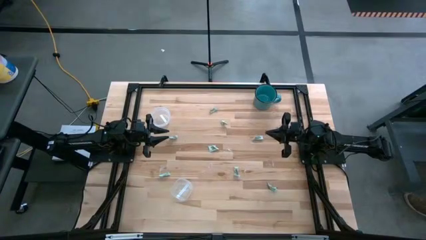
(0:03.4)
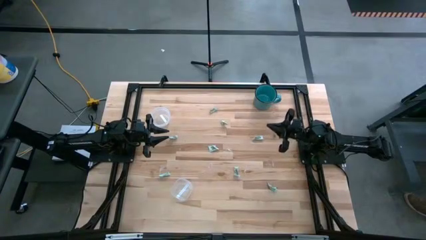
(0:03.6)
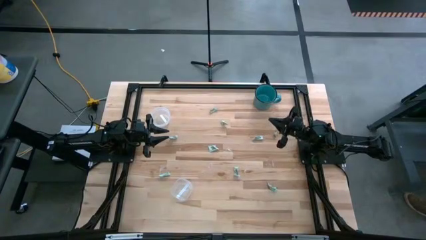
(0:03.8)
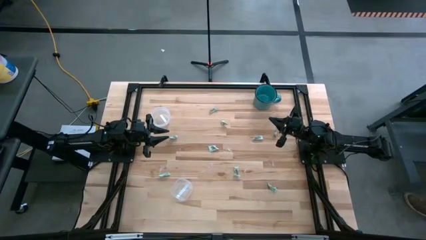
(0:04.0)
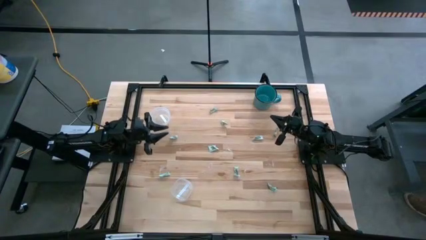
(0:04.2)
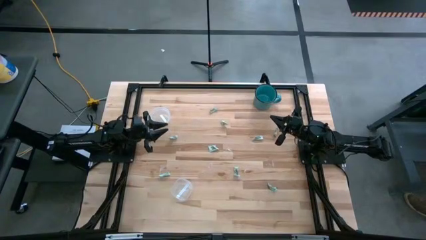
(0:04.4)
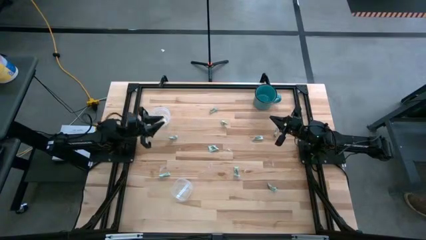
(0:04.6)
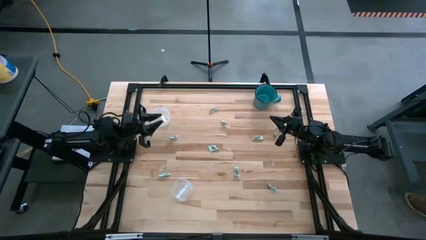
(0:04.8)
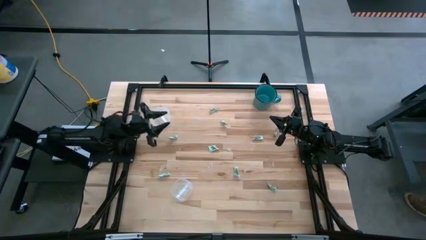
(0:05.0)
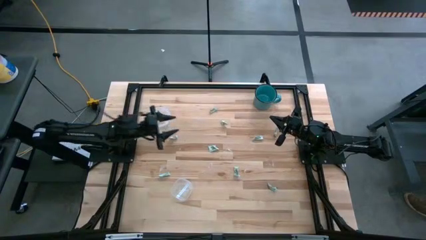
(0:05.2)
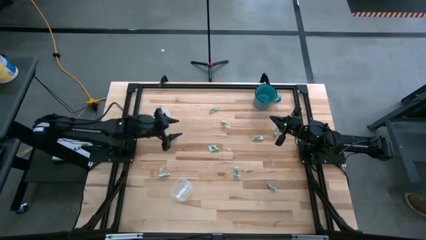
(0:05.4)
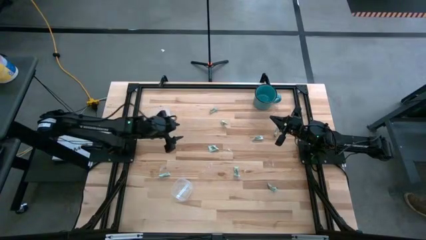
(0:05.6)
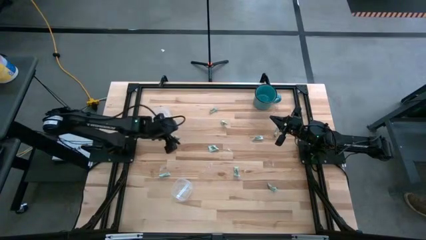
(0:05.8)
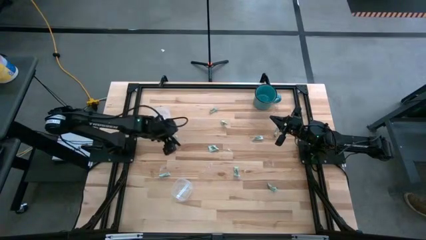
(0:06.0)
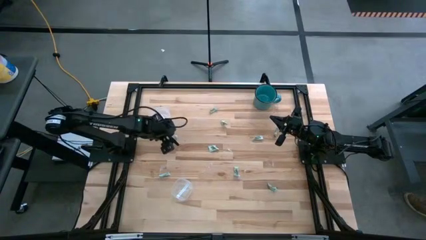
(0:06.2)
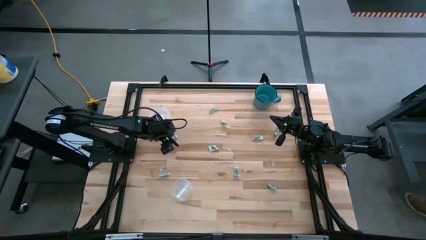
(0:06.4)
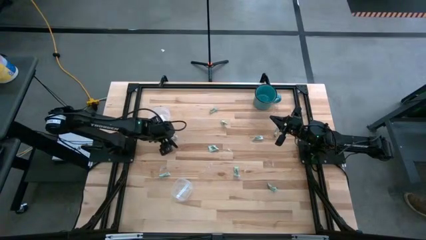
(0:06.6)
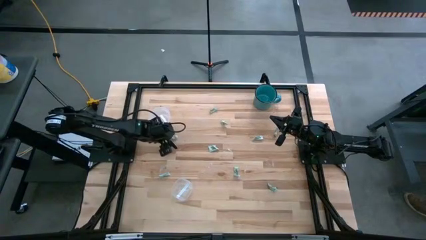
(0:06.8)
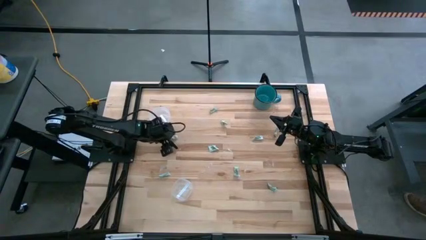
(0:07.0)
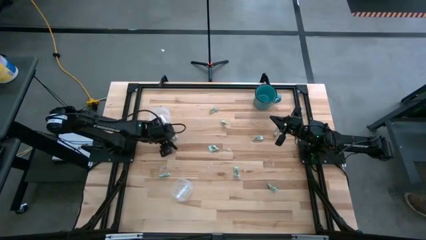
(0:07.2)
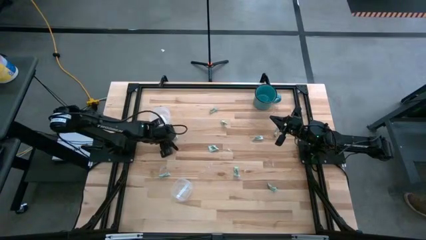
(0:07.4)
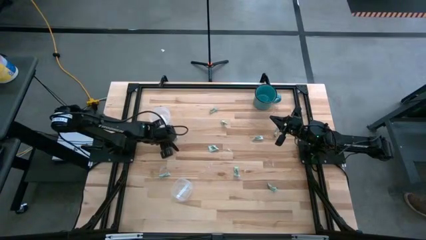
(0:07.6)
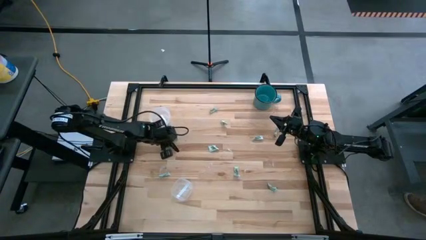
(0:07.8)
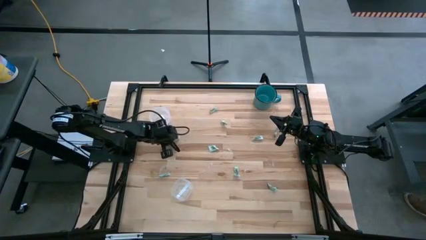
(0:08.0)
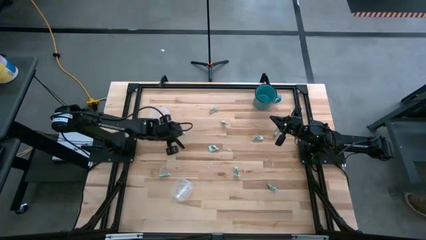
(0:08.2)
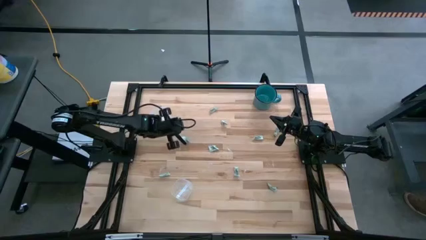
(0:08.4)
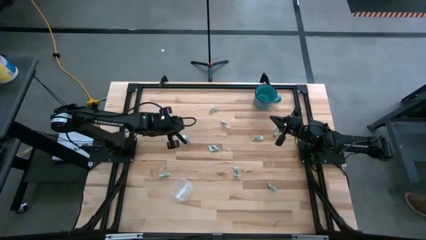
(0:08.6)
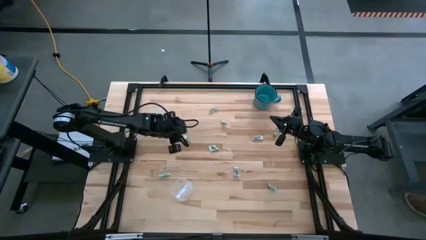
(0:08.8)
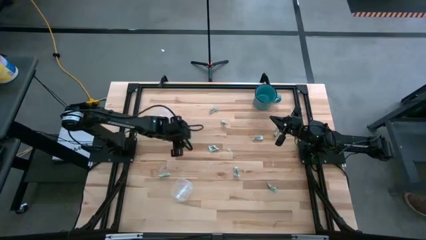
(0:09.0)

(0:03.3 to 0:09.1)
Task: Pick and place Stevia / Truvia into bins
Put the stevia packet into the top transparent container

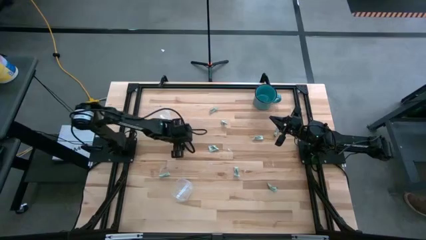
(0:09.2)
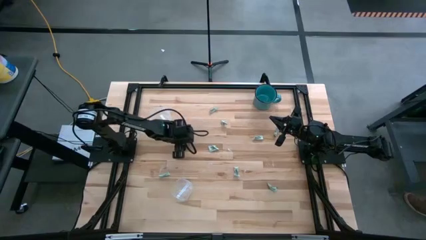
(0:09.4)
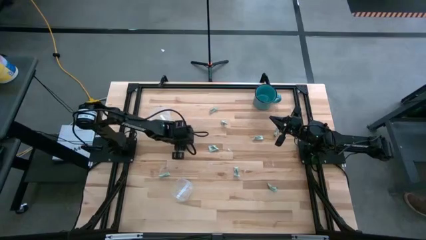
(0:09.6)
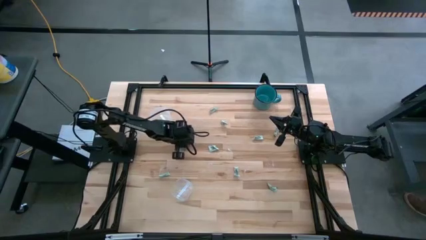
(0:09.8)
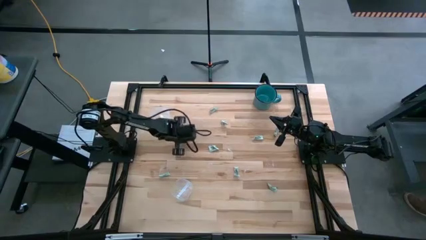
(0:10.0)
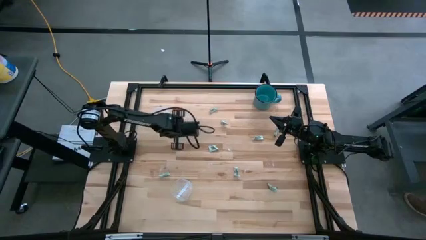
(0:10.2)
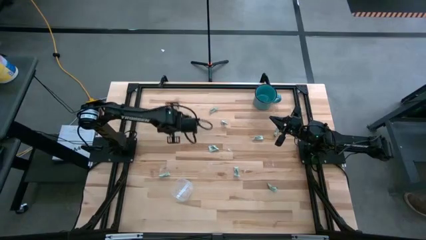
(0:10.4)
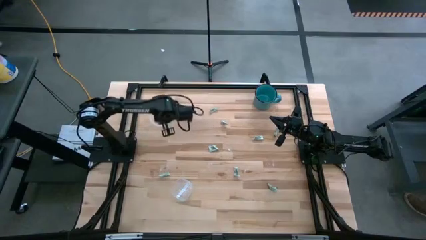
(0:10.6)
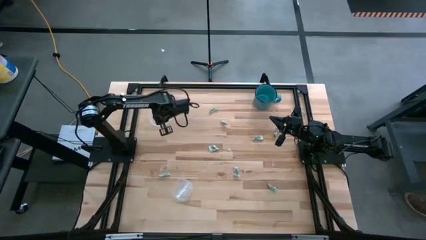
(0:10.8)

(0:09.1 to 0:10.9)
Put the stevia packet into the top transparent container

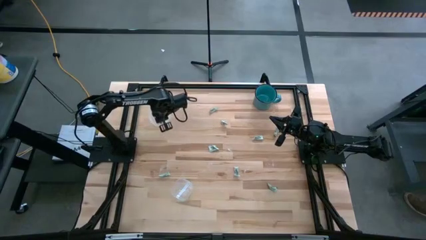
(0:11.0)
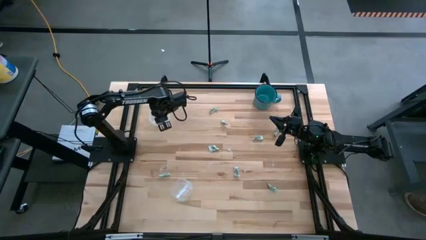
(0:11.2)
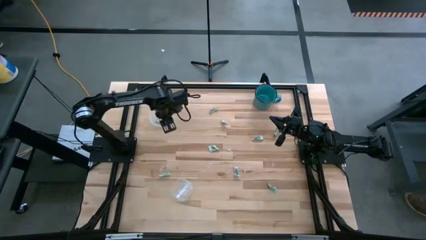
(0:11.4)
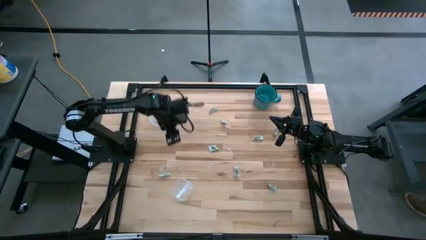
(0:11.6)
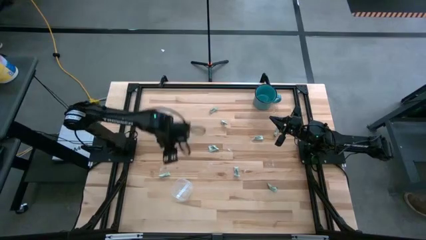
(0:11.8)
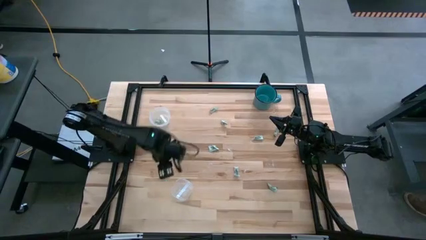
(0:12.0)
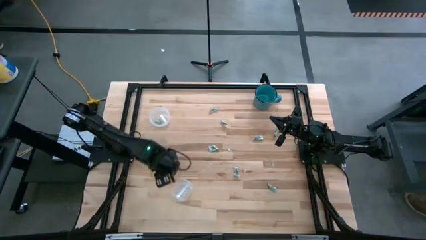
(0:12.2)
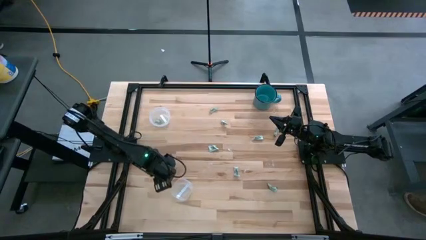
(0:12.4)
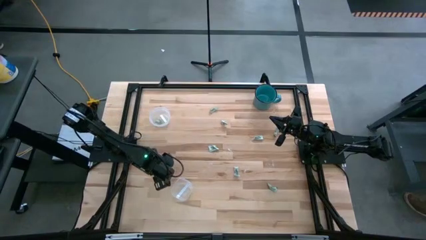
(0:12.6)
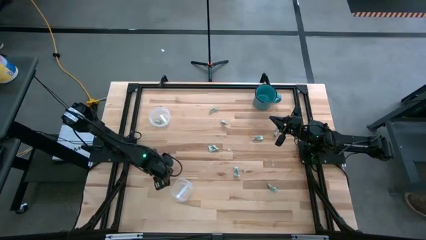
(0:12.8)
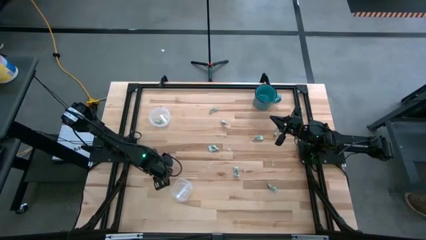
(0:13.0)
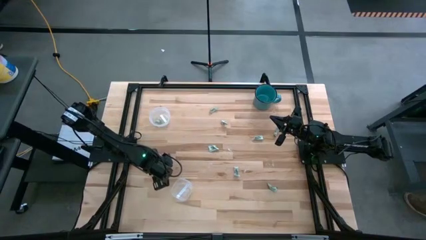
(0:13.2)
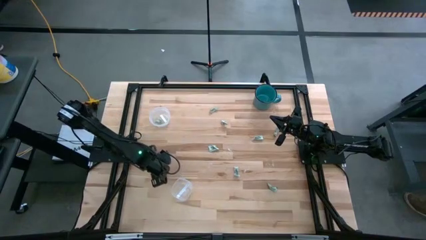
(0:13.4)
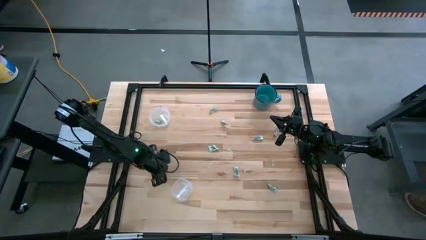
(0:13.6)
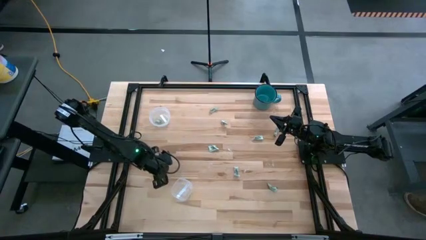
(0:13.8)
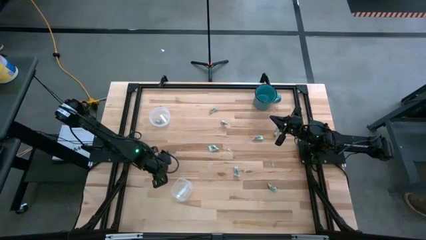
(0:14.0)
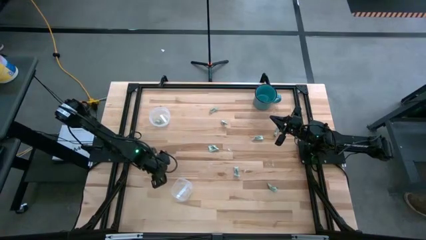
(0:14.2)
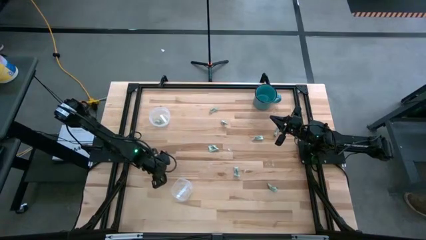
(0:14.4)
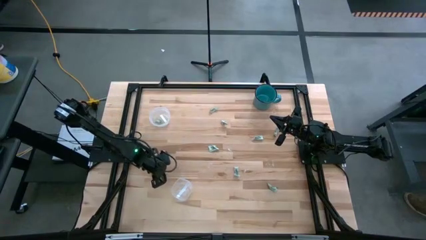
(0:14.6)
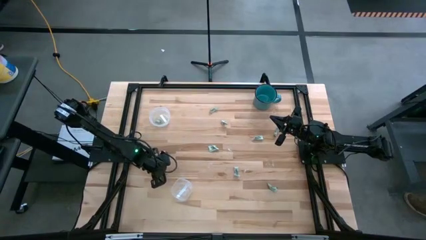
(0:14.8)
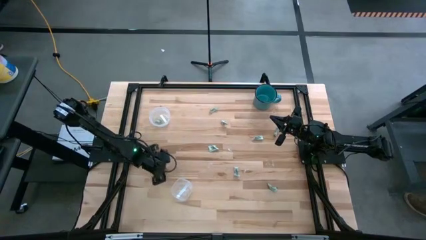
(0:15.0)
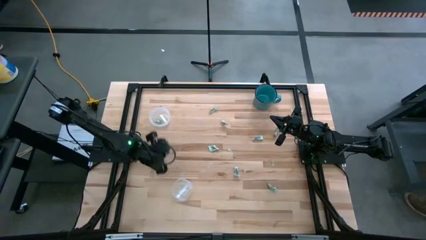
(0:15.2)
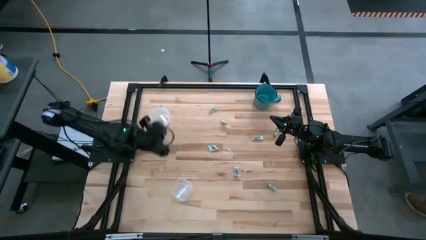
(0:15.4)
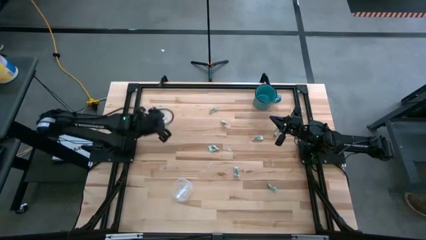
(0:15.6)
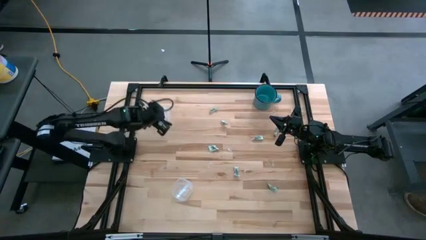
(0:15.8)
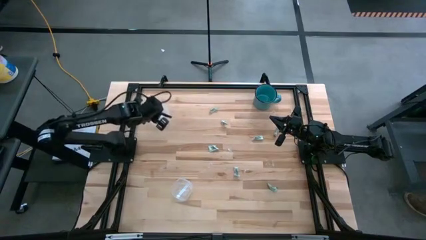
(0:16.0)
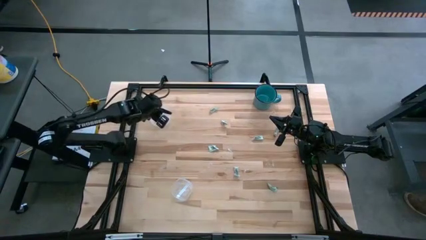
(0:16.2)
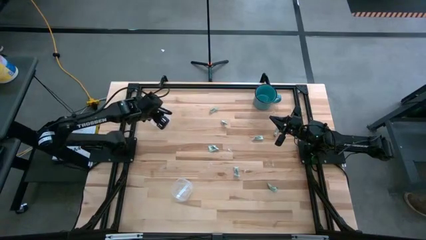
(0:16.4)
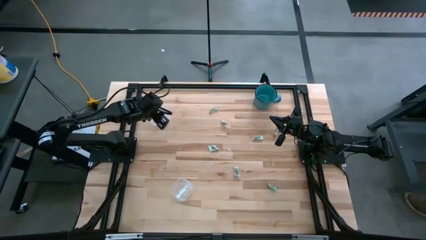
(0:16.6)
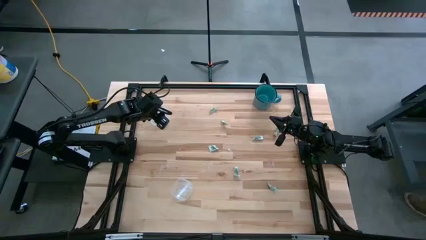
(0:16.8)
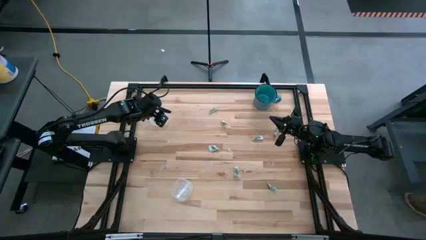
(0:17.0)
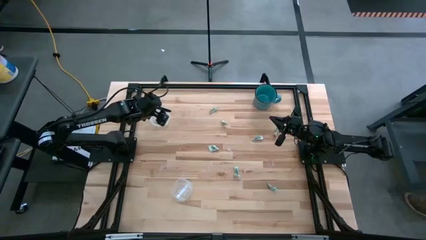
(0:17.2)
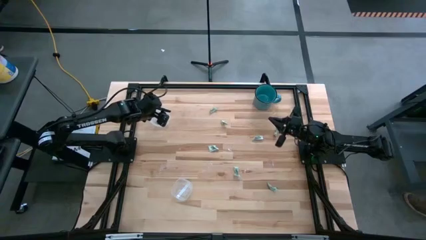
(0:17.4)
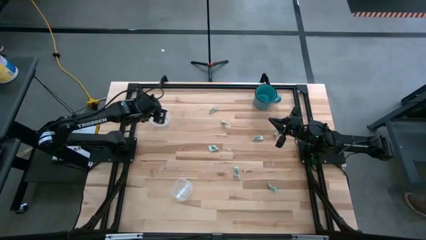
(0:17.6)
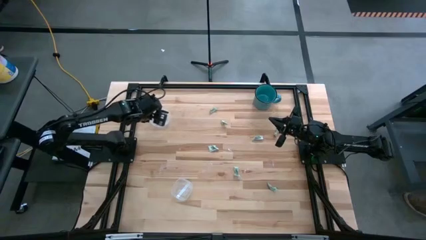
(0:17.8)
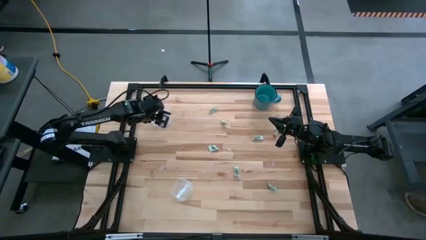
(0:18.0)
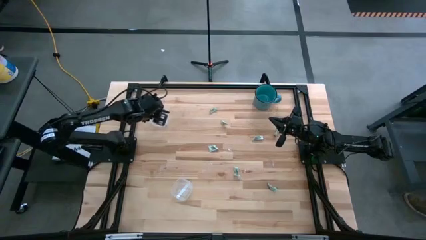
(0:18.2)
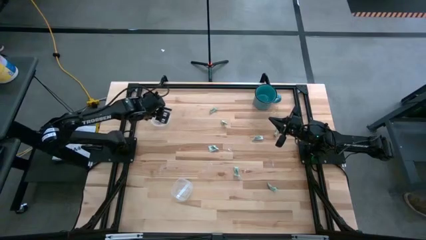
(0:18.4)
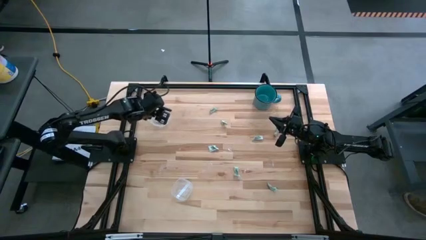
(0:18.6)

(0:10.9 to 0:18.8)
Put the stevia packet into the top transparent container
